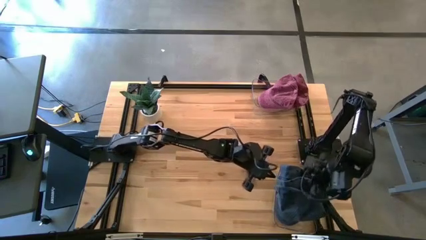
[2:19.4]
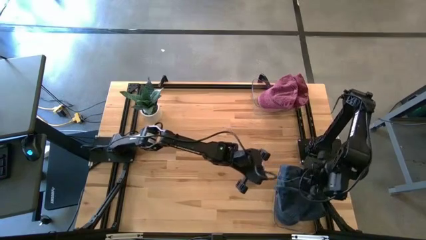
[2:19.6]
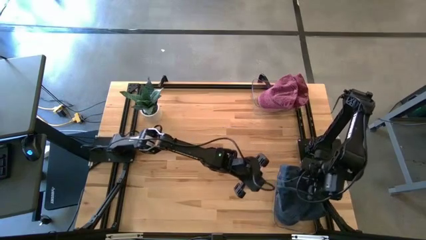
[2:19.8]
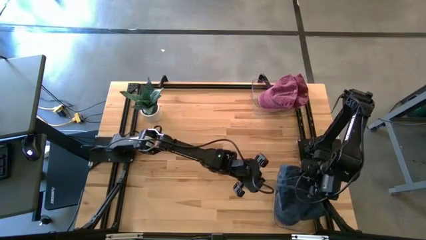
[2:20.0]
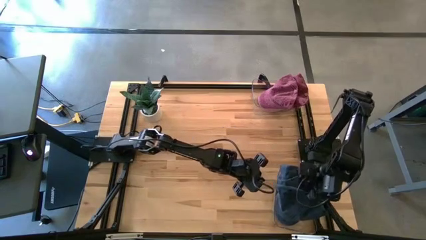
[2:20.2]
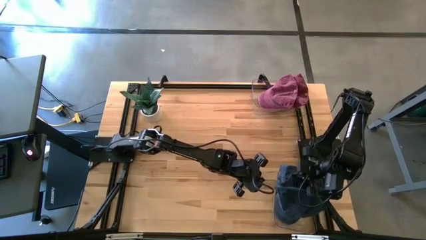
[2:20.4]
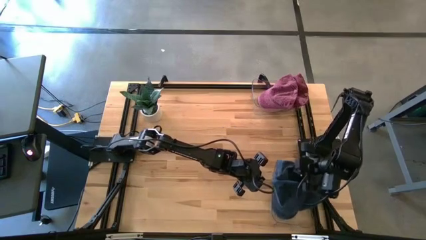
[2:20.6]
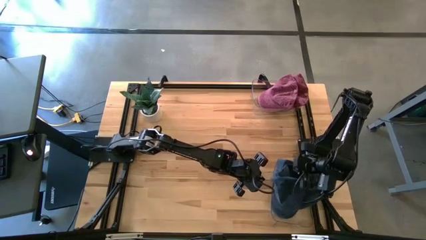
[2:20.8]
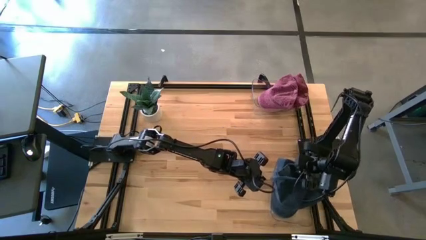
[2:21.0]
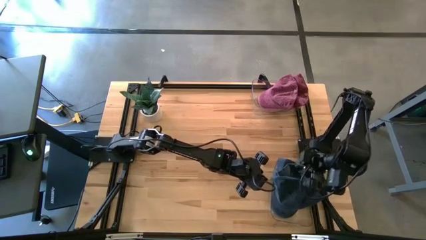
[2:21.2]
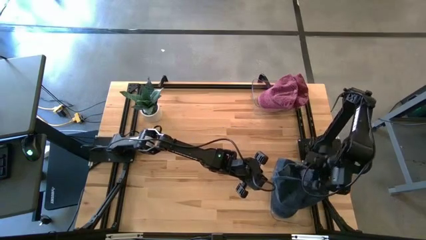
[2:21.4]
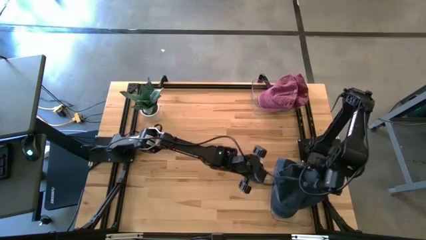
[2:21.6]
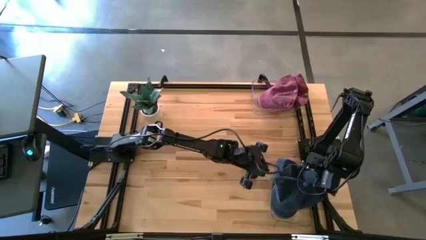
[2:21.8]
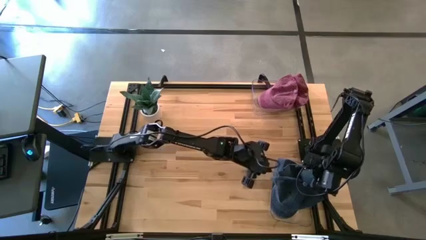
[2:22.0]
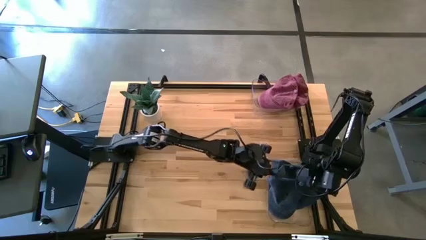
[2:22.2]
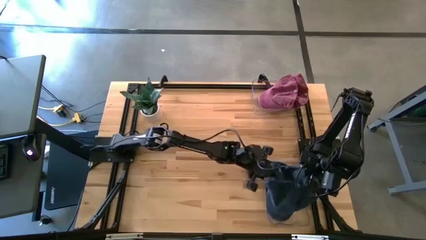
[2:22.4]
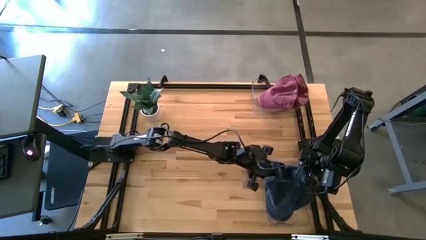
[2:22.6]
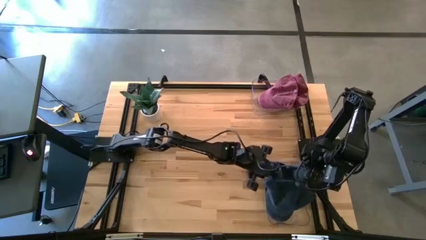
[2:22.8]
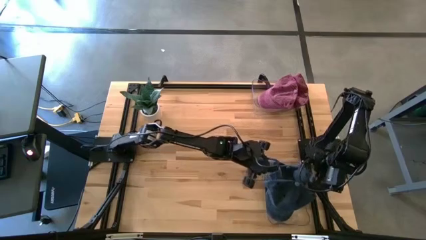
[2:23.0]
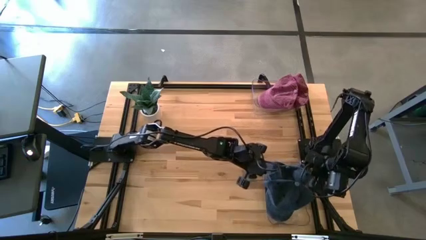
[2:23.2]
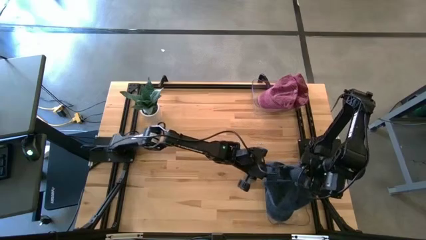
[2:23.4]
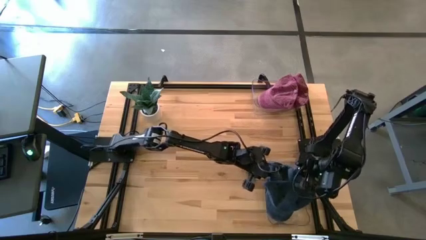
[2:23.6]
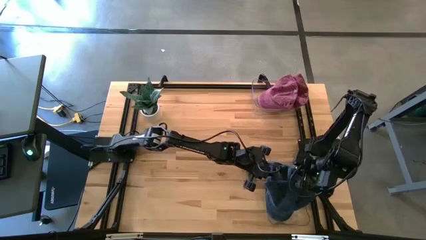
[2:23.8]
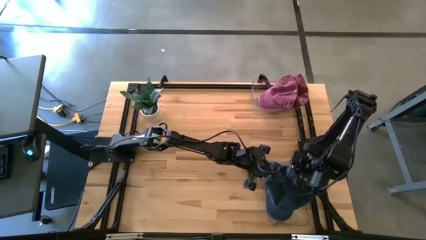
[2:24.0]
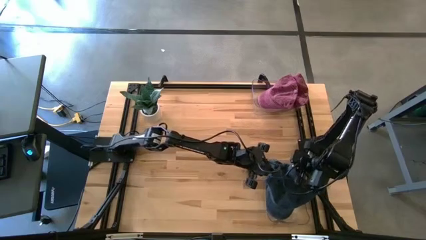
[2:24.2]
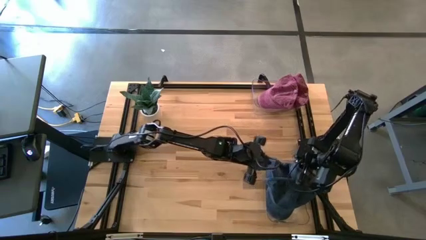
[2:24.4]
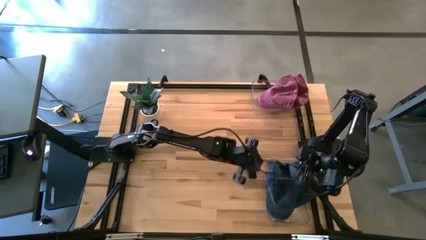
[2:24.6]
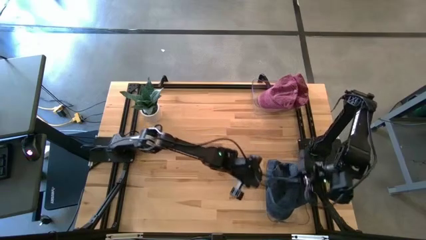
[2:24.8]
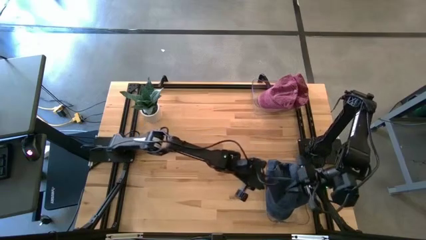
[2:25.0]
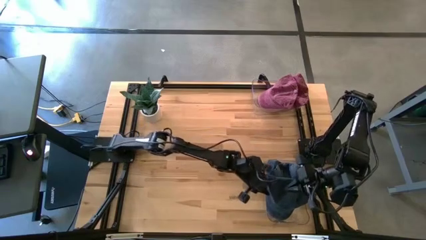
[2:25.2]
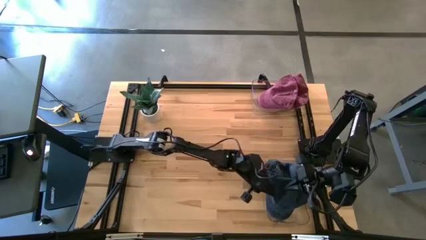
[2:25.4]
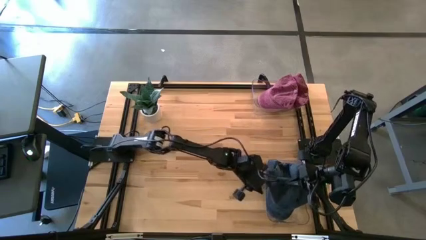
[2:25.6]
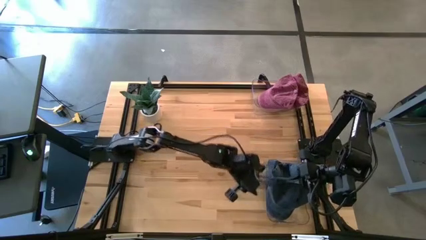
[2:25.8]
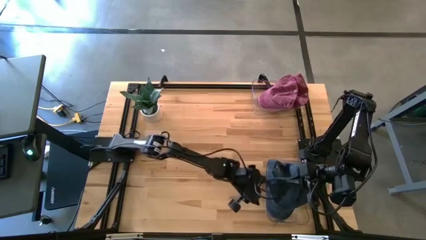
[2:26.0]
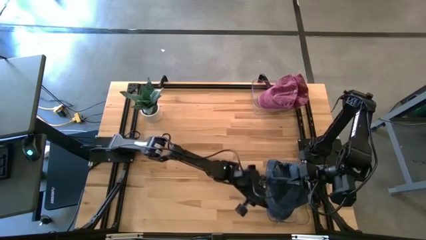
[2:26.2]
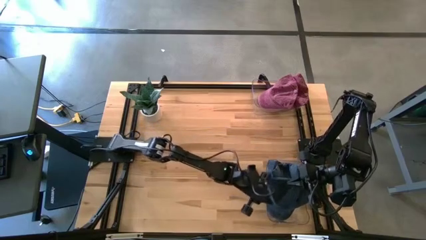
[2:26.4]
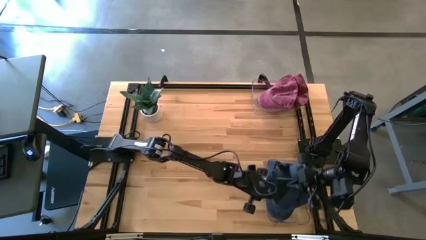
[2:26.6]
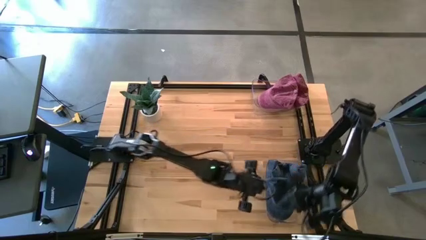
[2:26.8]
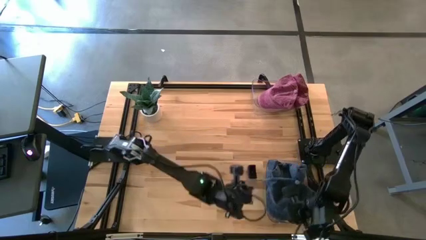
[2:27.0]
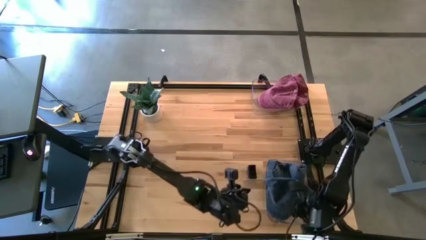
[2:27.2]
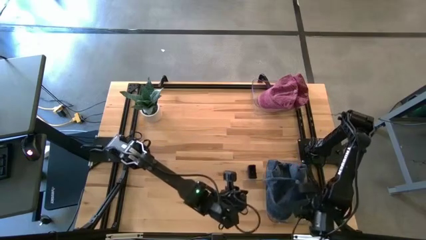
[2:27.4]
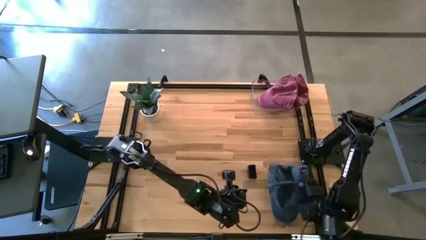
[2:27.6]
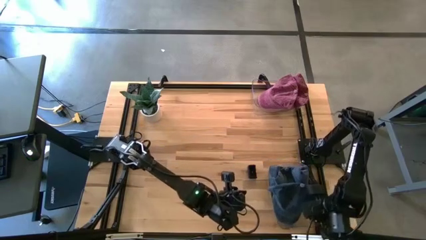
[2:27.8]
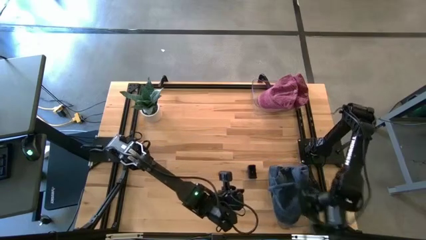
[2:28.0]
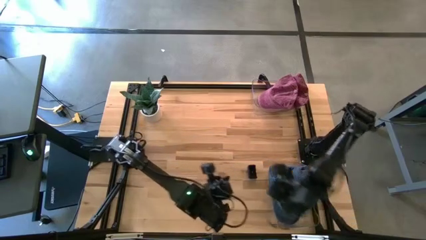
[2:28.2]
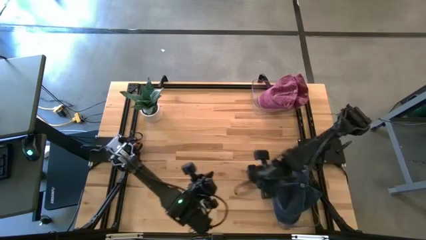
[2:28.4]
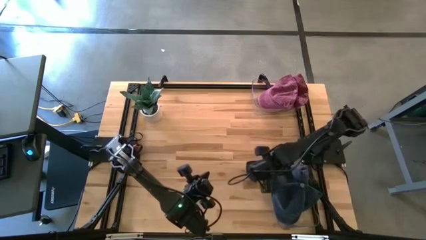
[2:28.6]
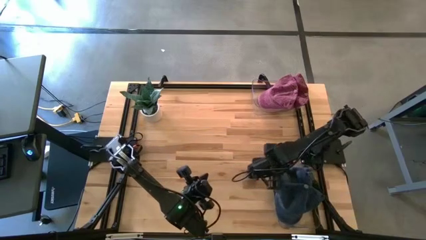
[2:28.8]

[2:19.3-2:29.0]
Task: Pick & Place hat
Adjust the blue caps into the bottom transparent bin

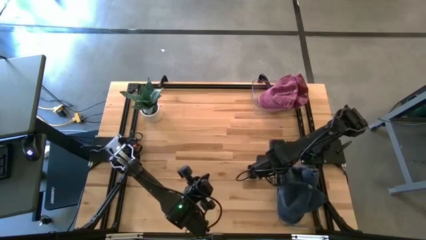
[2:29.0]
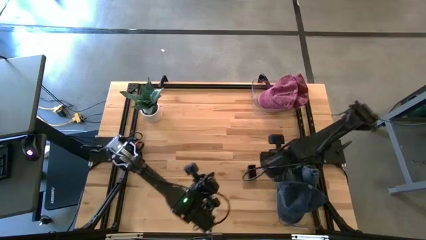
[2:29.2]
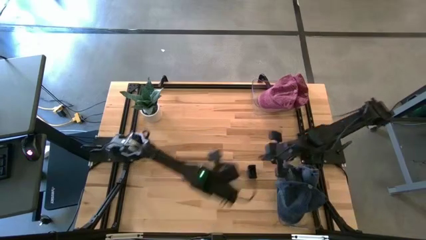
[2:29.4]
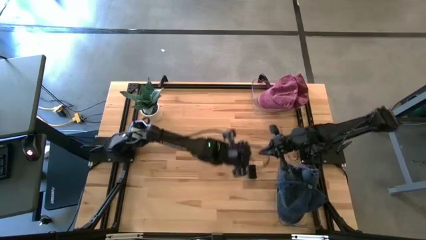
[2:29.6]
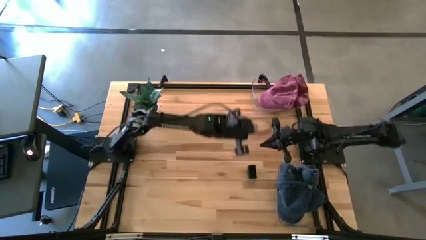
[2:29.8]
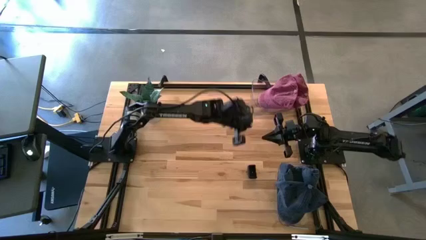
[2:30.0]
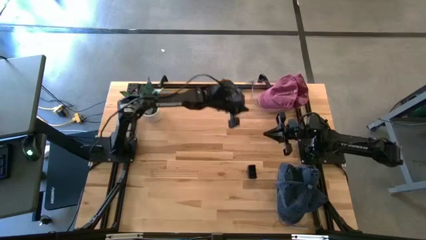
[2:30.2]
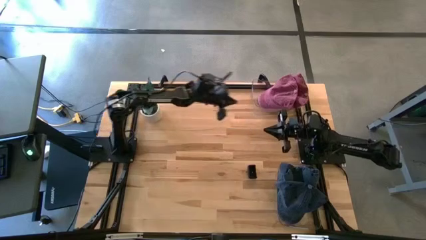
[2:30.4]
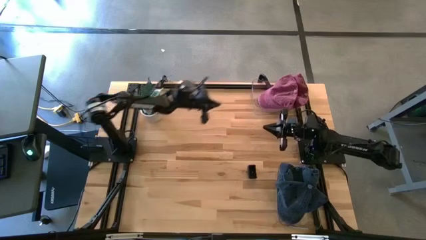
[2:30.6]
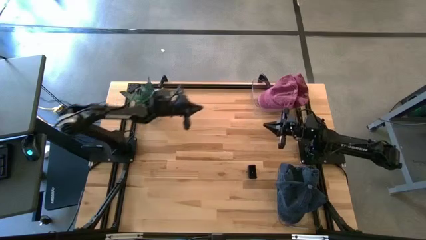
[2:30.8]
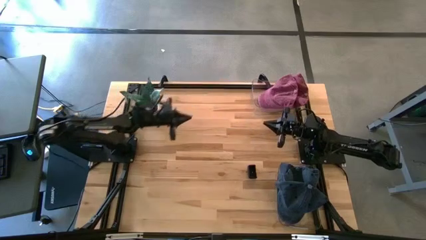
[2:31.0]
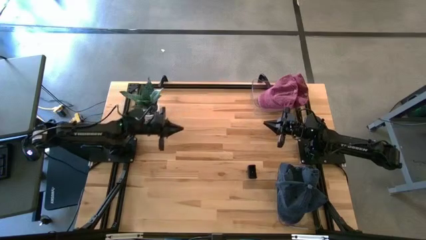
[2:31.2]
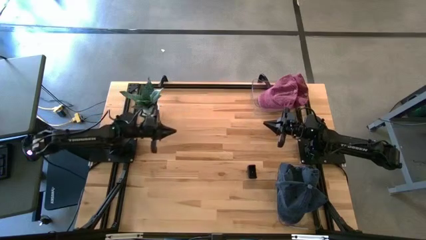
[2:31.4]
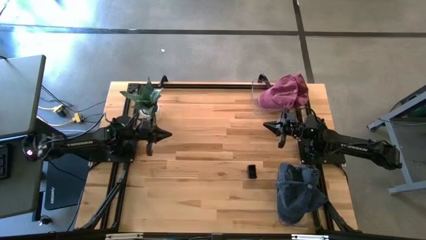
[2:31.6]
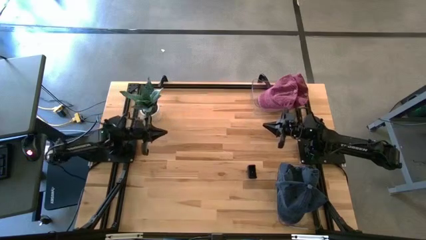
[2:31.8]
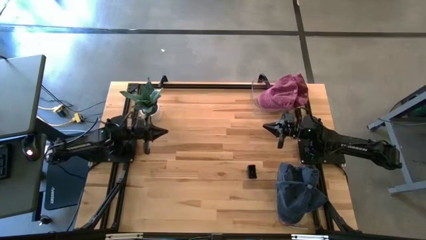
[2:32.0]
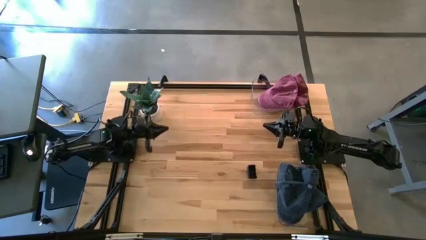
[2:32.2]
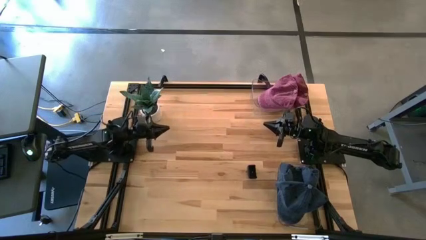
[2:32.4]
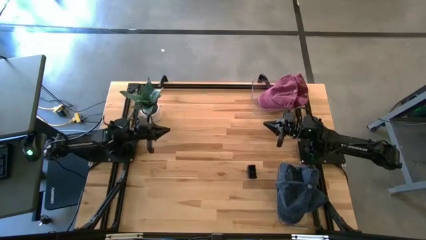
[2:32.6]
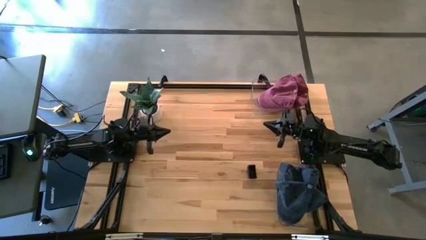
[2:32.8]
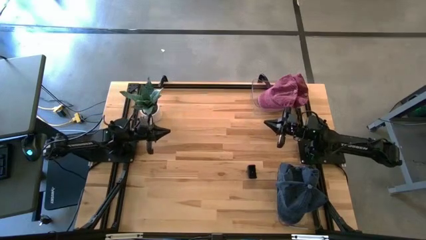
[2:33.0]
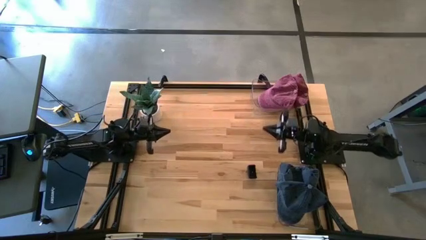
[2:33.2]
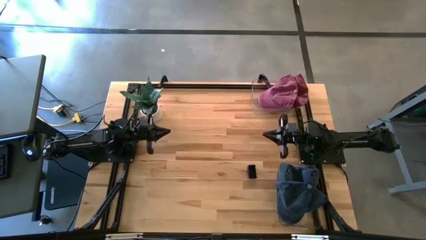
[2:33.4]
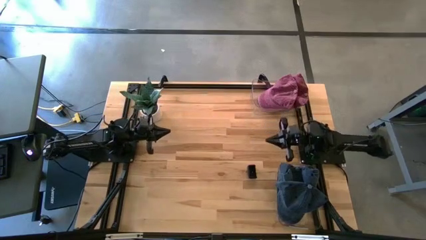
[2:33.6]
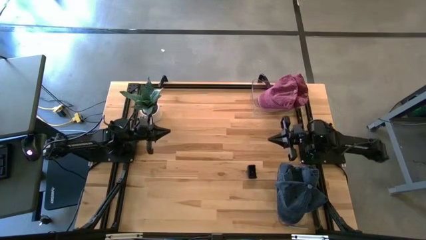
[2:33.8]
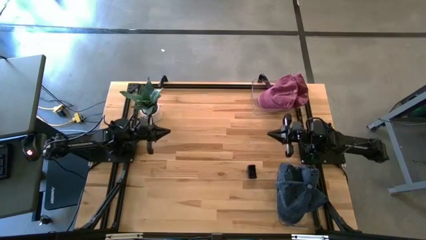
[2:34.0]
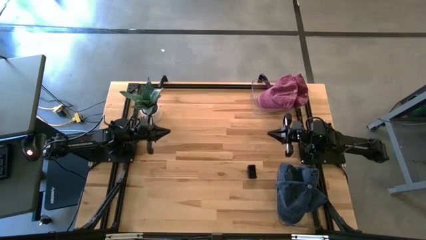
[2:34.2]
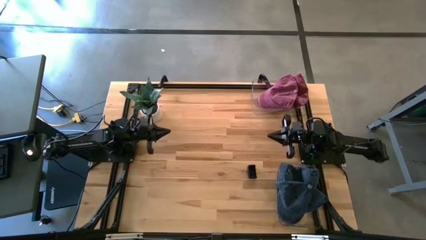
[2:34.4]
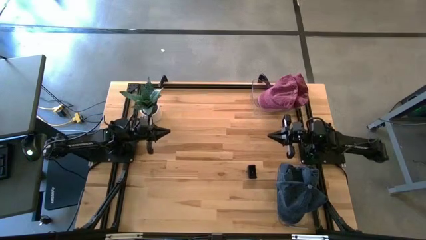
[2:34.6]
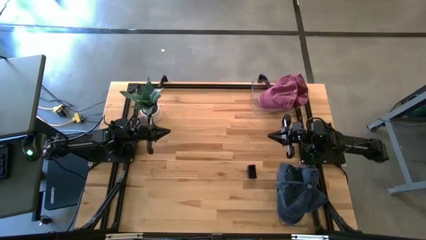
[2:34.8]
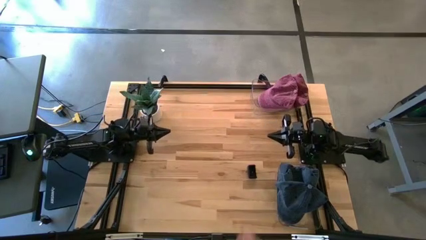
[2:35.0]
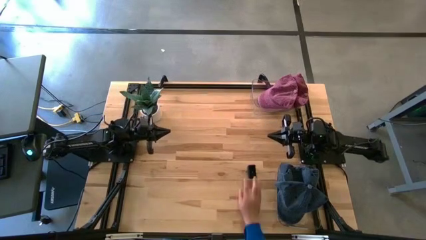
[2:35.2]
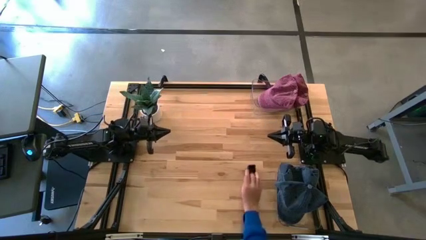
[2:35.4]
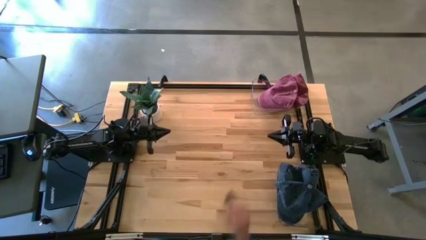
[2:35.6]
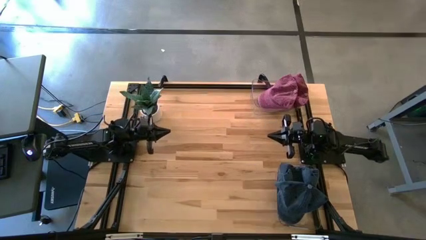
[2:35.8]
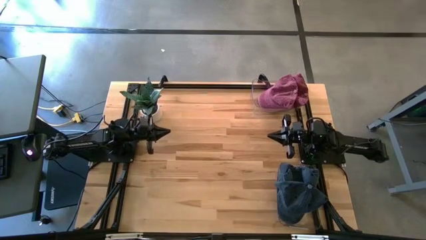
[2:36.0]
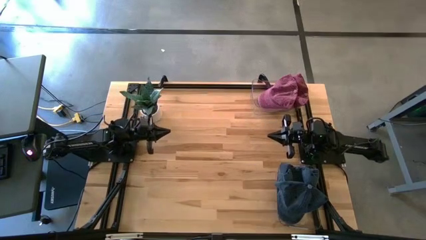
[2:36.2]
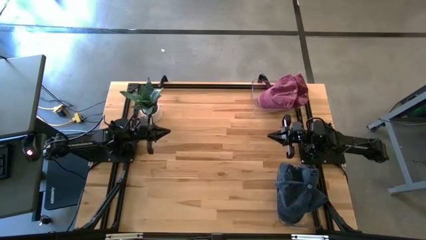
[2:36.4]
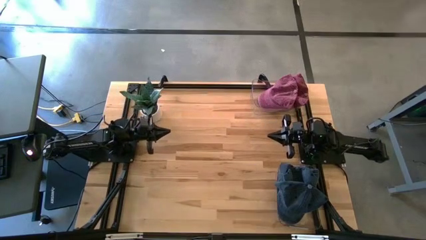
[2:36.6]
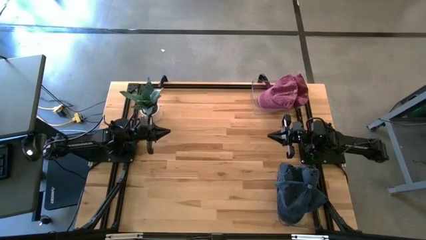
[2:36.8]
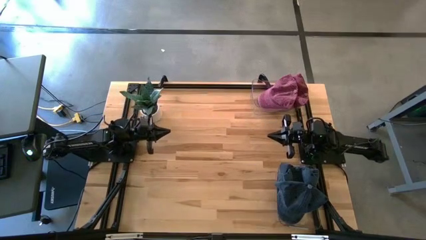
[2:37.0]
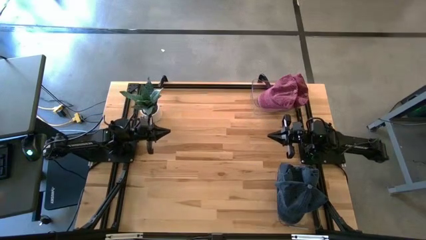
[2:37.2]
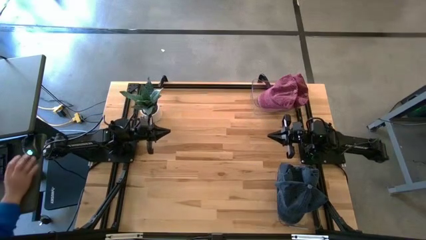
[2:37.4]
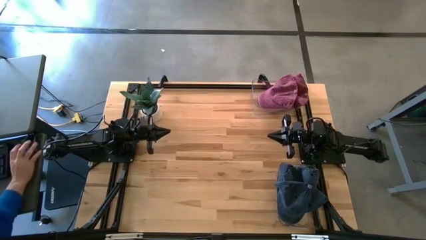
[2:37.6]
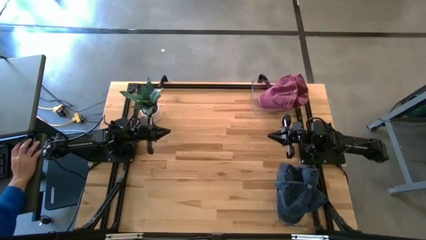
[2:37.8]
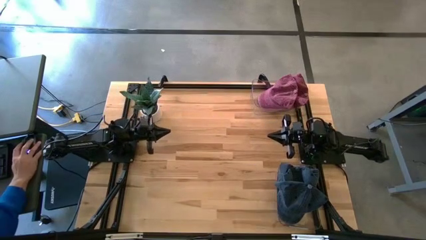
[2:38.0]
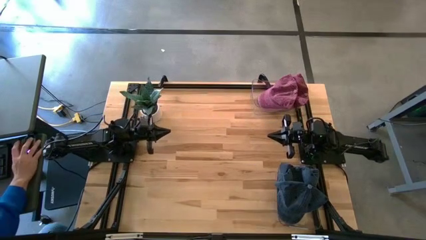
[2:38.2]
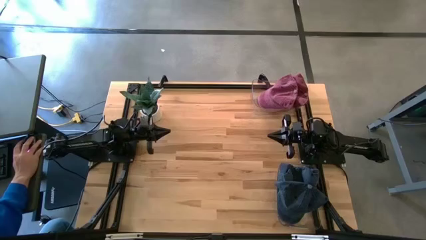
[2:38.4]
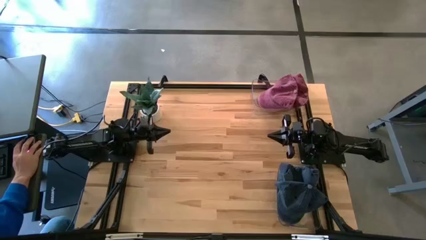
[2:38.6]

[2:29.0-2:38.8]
Return to Home Position
